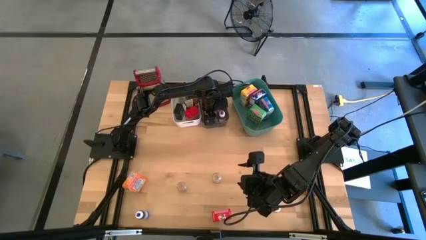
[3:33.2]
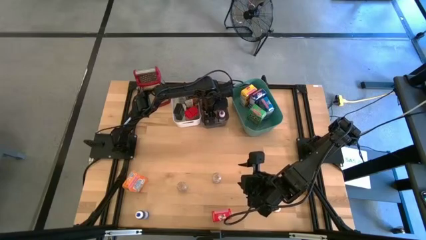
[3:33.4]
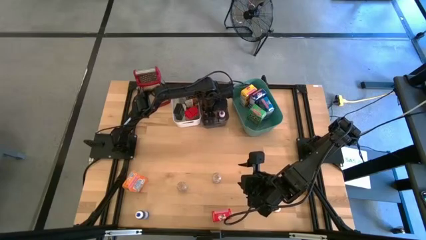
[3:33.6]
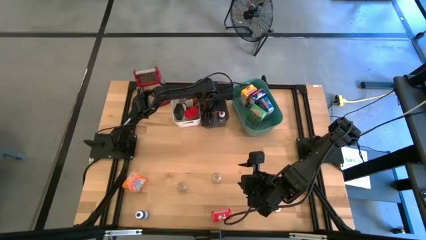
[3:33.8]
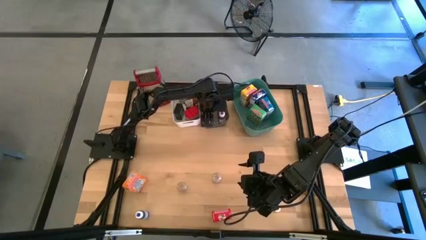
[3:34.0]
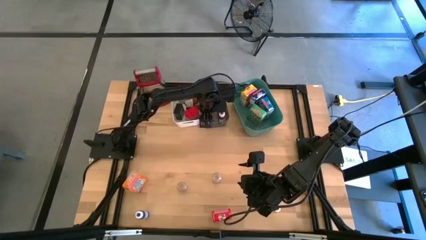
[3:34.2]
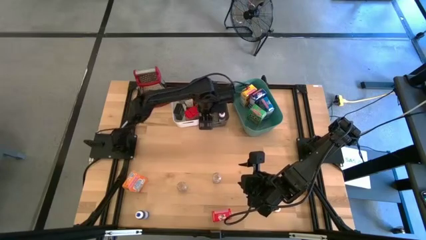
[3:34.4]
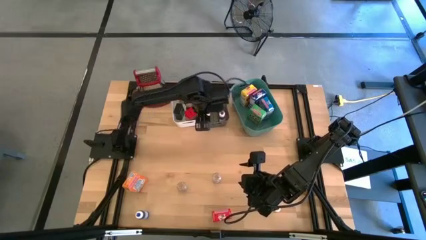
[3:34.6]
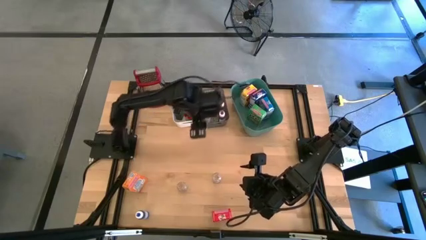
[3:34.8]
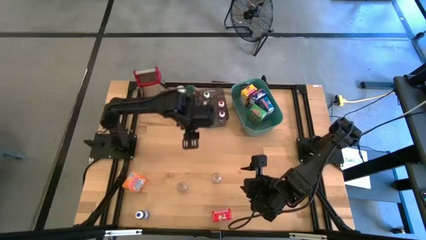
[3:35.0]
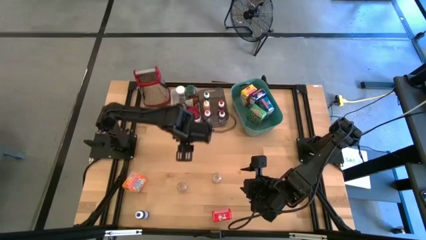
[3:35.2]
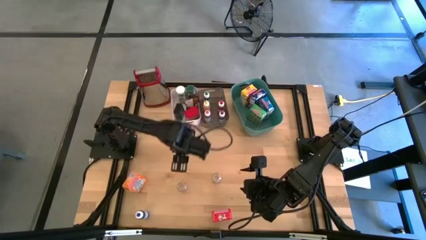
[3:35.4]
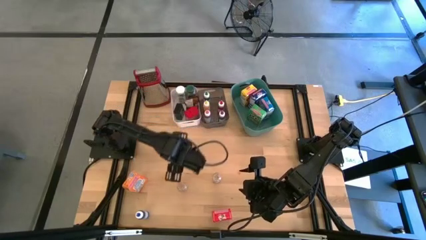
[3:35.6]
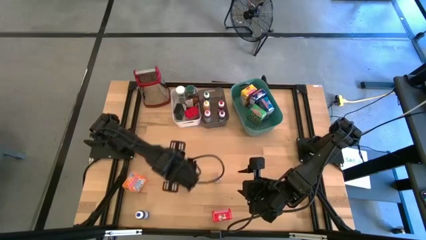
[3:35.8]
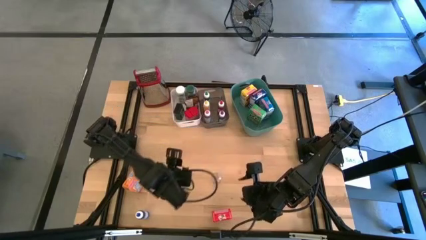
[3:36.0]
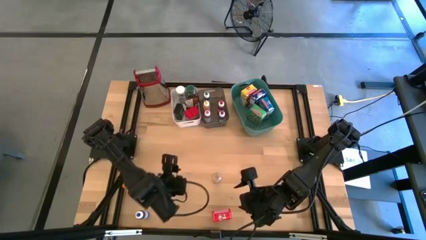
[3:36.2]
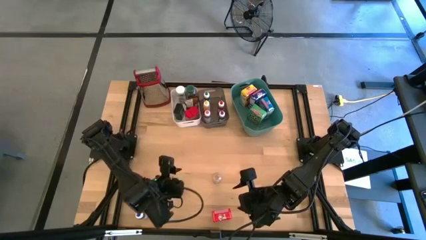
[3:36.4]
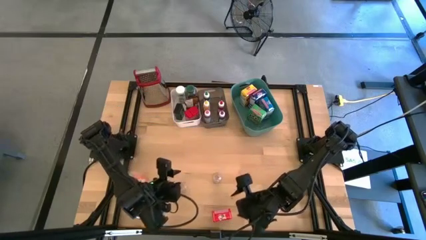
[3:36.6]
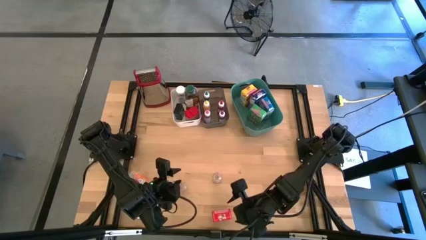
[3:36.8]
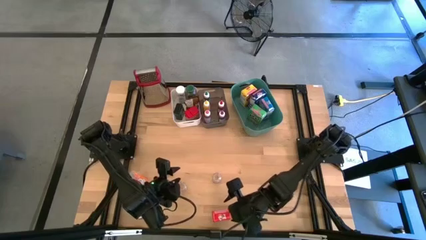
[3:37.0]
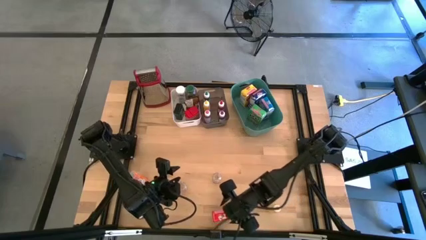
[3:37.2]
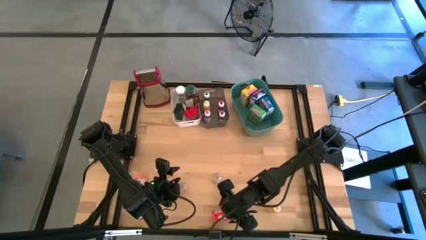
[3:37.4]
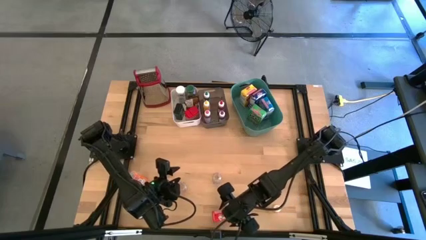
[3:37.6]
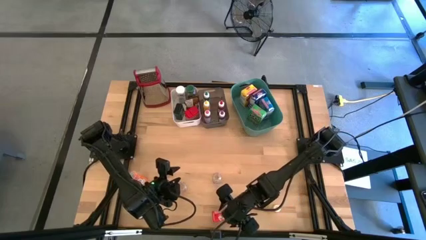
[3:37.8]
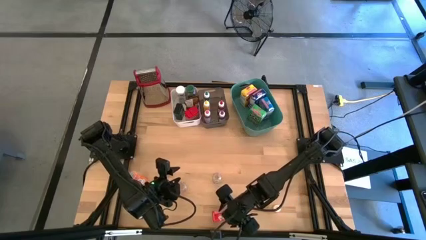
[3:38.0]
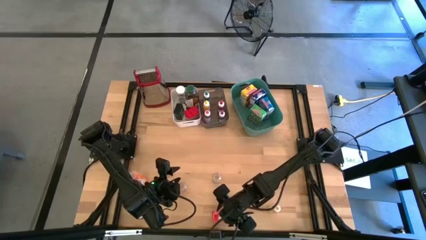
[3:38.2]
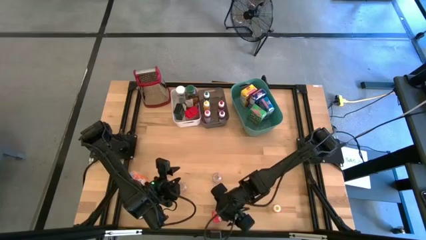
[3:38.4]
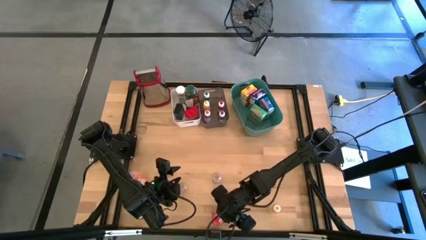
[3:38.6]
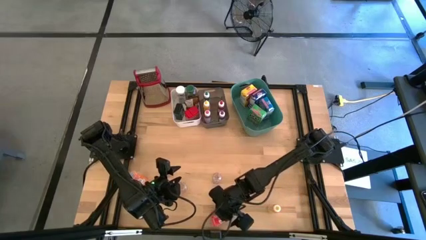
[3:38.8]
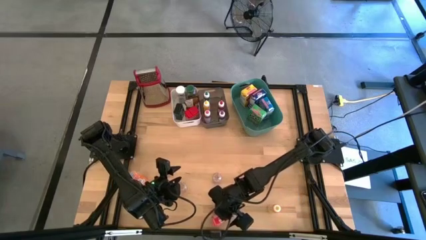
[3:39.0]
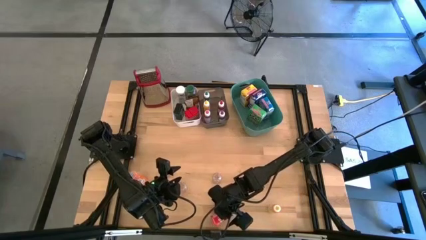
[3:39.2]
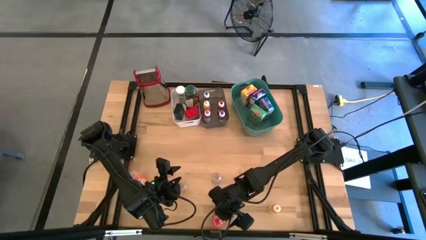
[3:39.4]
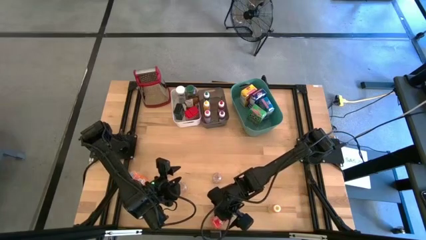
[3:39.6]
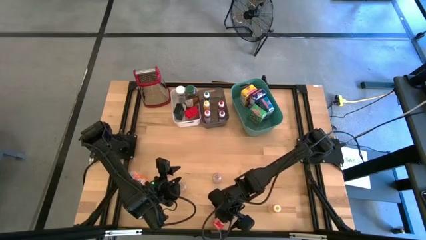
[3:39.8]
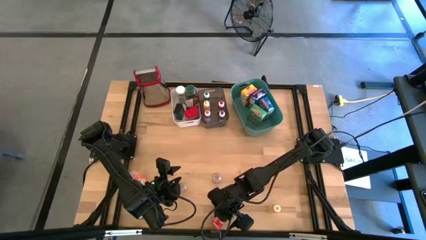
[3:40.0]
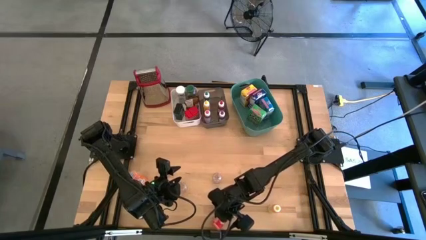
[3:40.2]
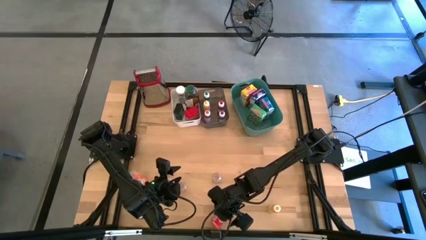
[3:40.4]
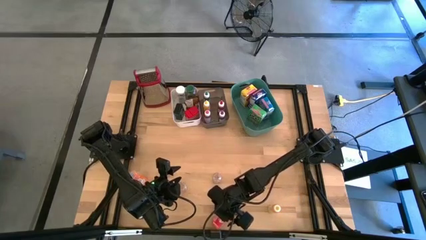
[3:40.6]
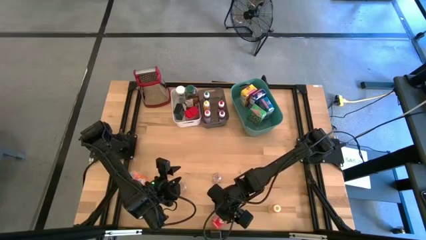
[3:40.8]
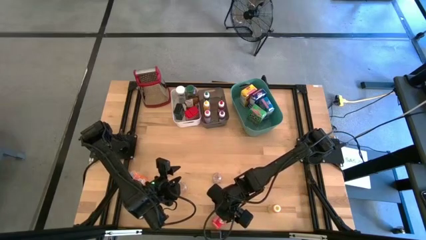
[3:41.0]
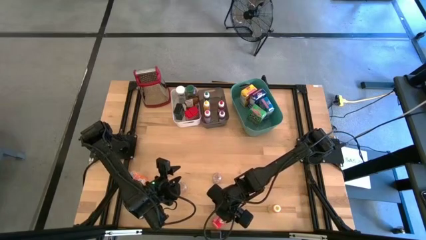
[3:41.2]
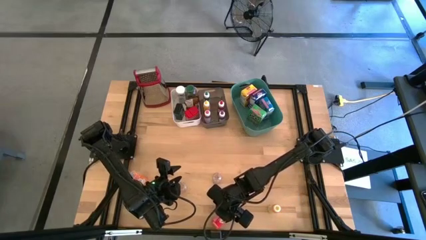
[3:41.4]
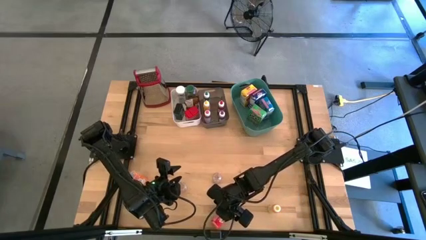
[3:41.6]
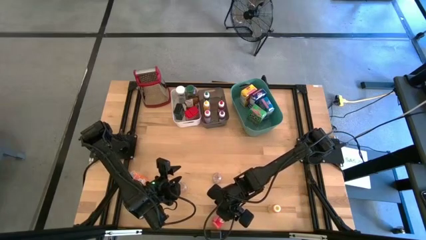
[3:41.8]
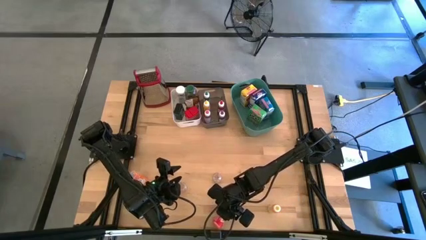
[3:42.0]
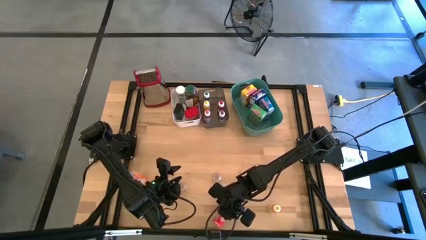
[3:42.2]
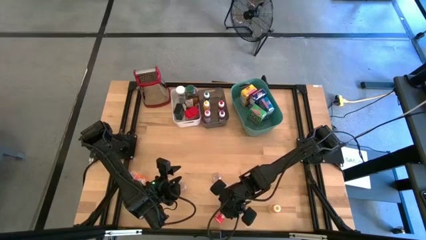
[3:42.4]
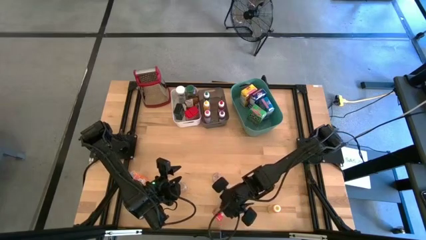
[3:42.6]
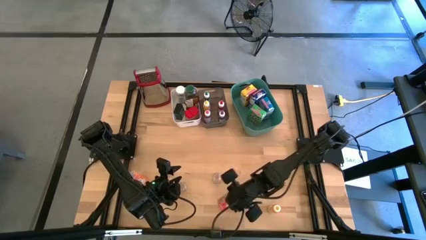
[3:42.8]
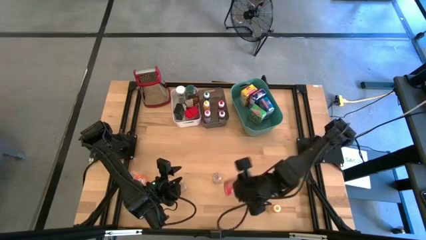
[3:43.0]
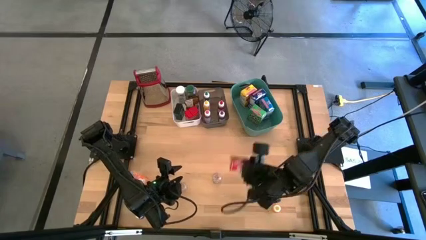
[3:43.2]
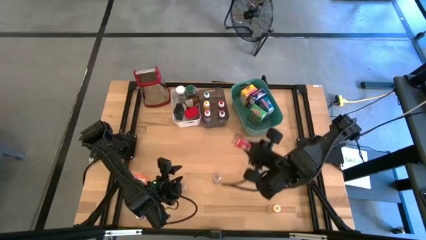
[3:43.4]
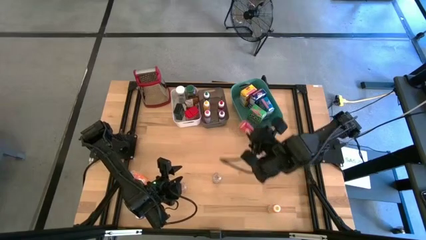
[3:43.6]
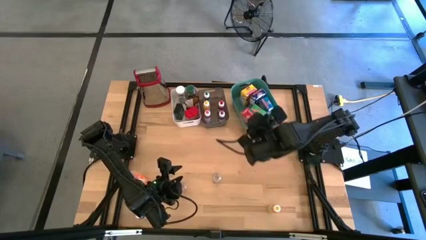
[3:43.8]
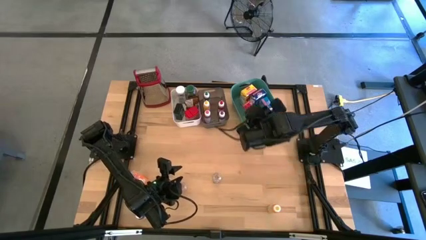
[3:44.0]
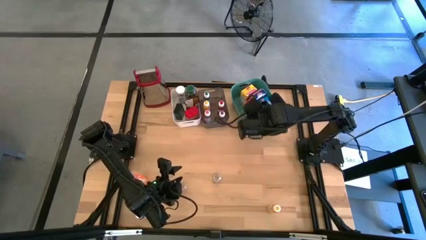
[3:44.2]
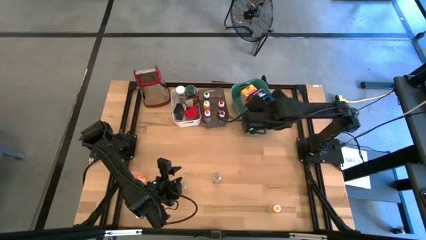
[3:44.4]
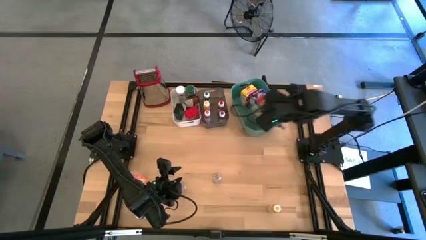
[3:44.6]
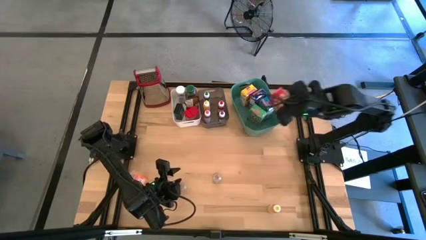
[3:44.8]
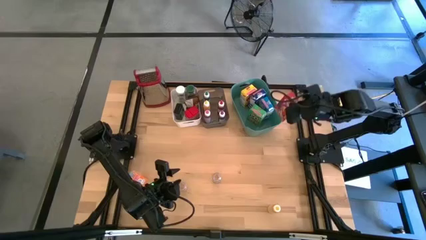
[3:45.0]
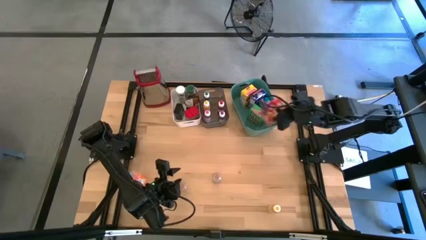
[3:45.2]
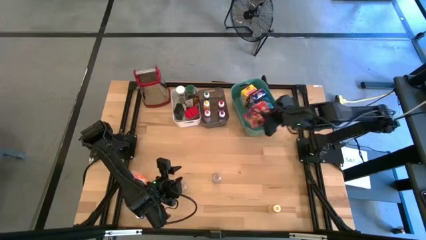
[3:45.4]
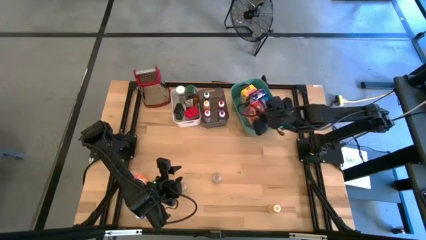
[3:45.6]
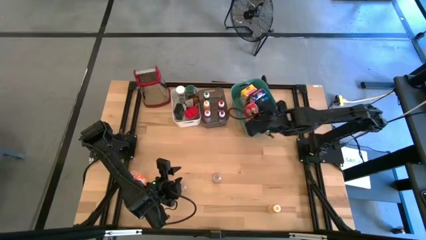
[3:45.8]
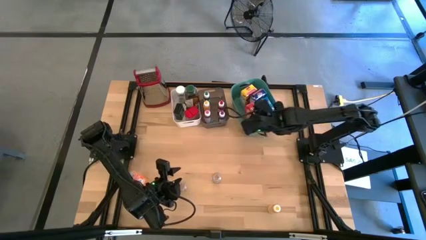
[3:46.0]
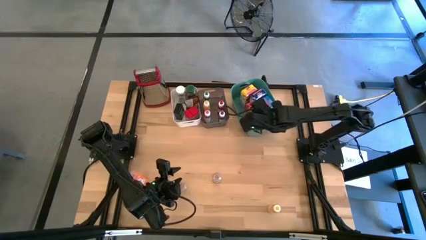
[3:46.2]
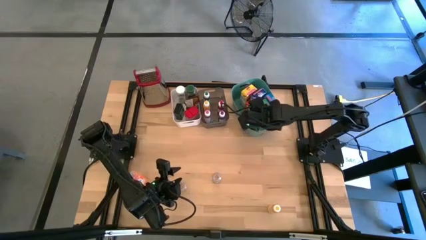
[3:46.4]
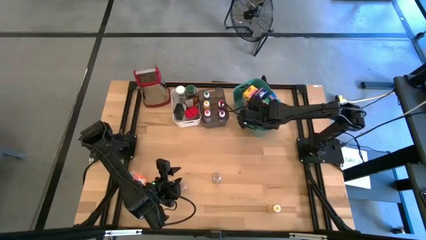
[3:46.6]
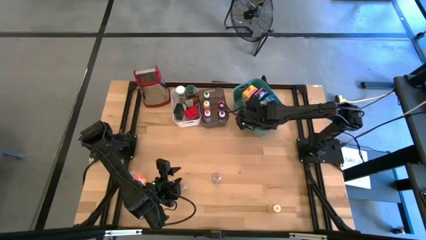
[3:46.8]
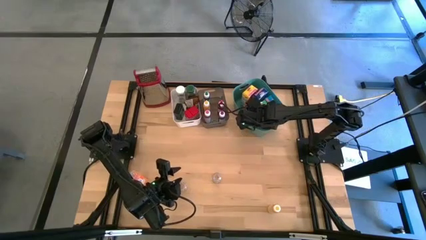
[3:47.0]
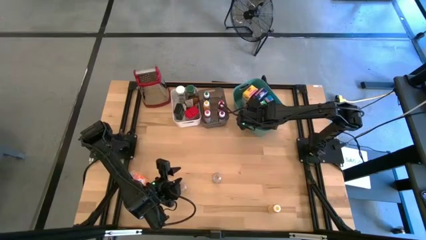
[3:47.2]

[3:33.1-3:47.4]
Task: Pick & Place Kitchen Items
Put the pink cereal box into the right green bin

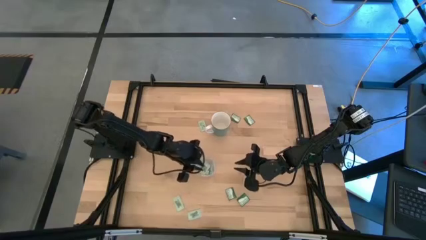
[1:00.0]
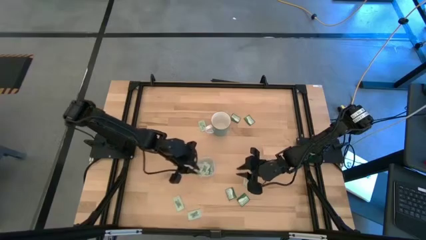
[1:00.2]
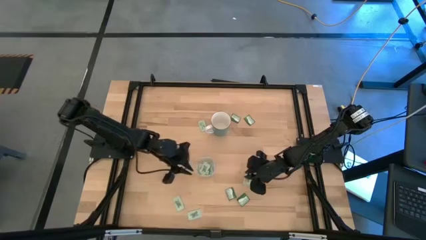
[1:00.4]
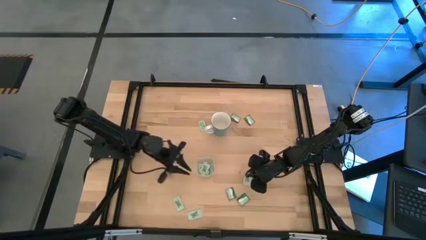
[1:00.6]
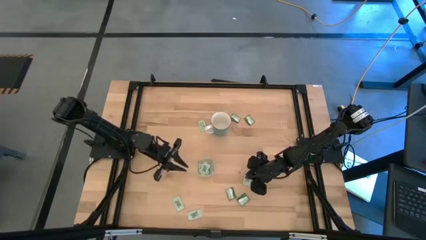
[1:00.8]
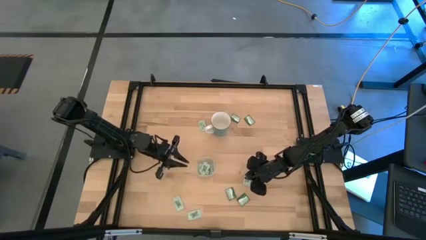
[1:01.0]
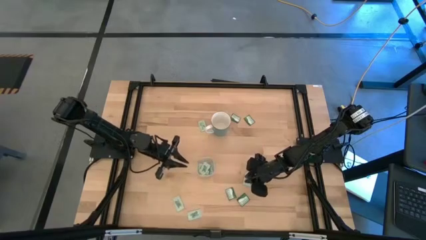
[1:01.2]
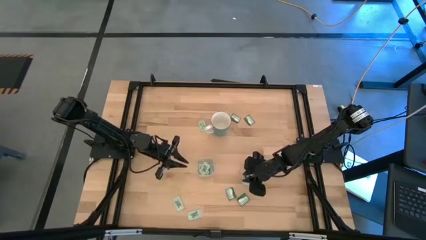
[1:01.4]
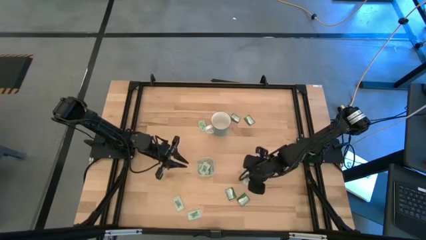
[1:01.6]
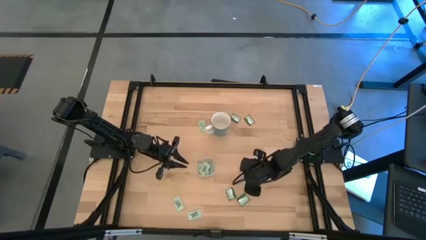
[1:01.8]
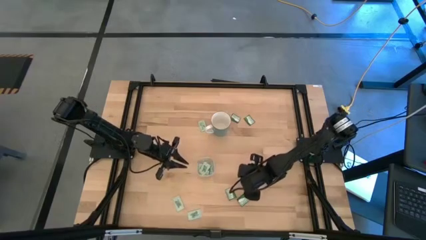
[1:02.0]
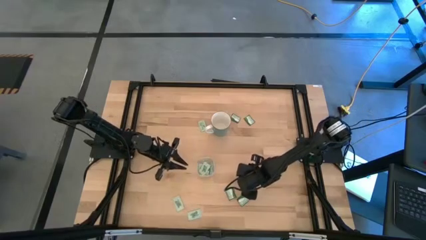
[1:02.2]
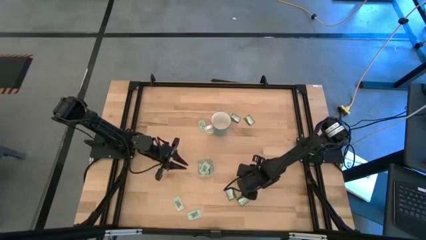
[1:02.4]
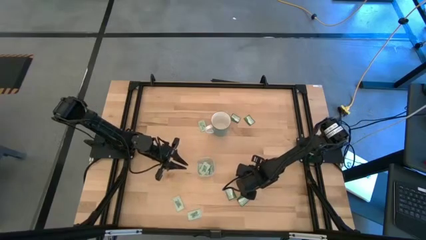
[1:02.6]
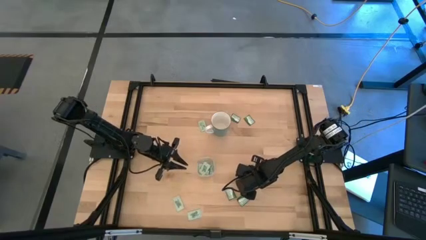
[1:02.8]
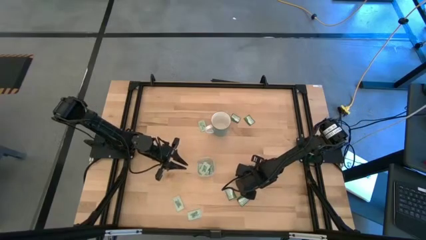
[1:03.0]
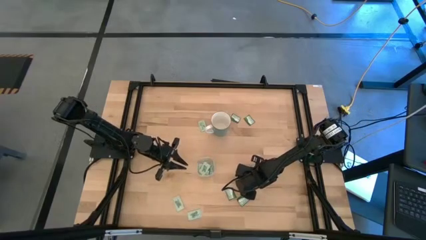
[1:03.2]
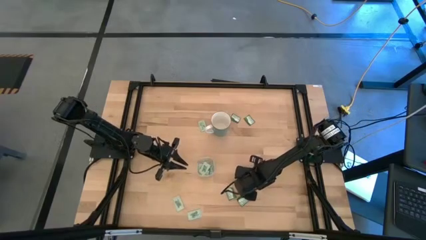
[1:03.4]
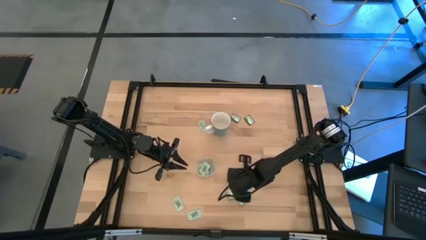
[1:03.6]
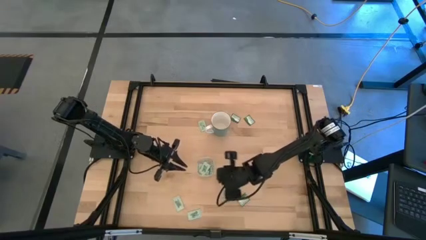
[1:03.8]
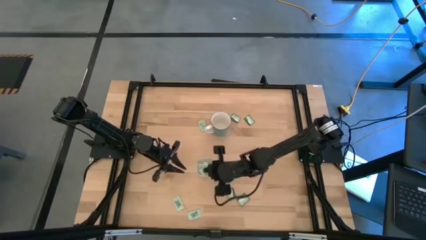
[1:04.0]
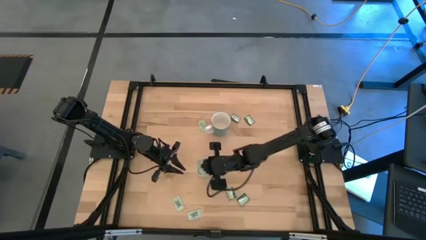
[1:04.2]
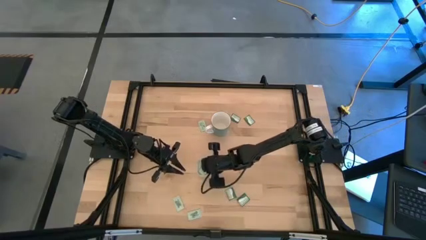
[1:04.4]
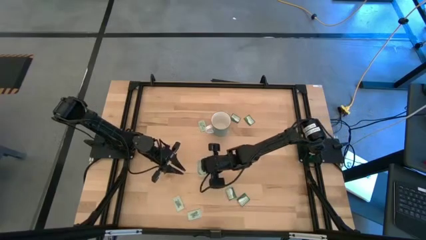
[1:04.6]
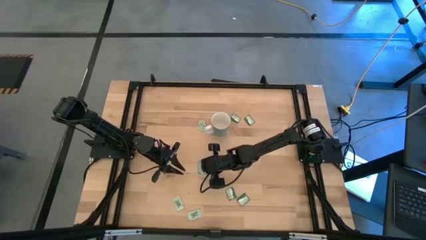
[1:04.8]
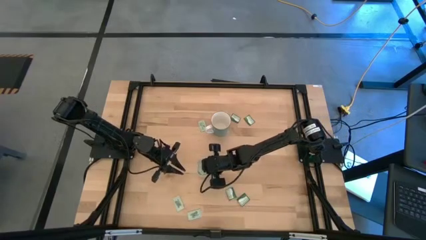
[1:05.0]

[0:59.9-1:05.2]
Task: Pick and place Stevia / Truvia into bins
Put the white stevia packet into the transparent bin
